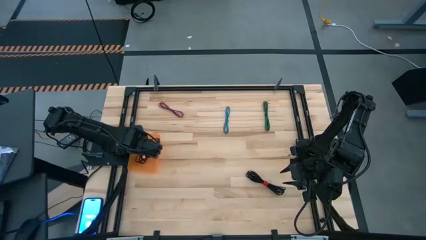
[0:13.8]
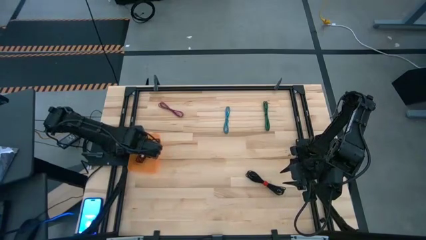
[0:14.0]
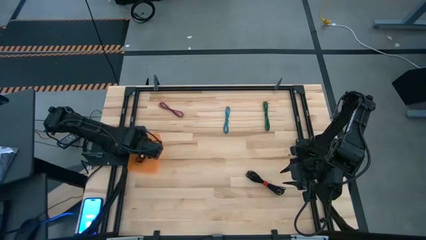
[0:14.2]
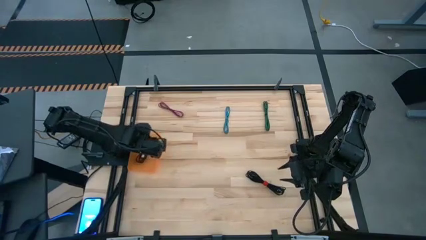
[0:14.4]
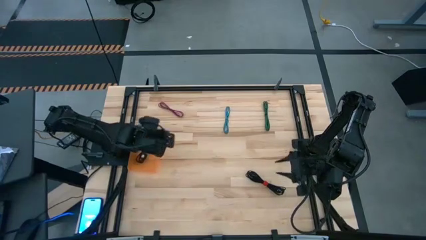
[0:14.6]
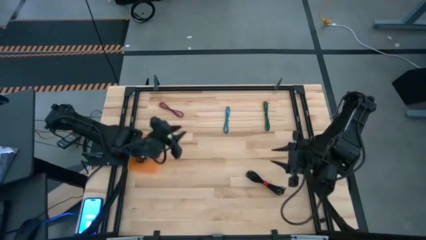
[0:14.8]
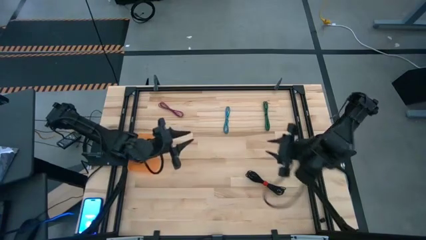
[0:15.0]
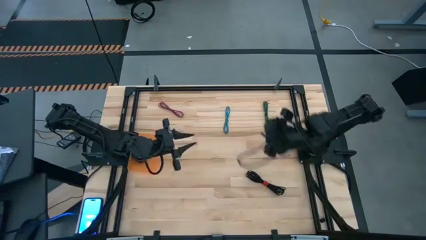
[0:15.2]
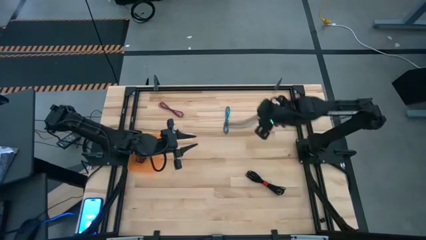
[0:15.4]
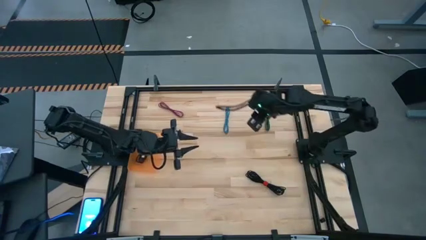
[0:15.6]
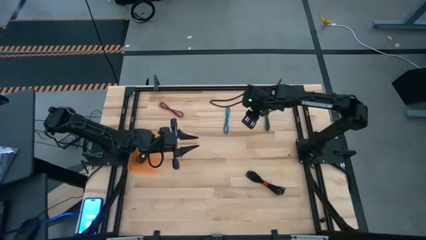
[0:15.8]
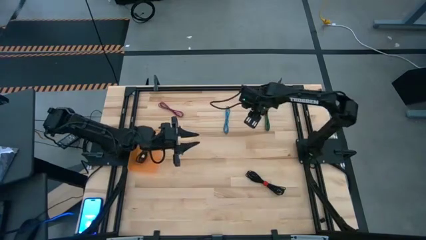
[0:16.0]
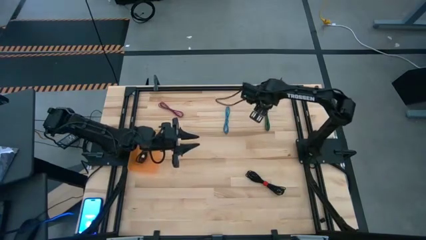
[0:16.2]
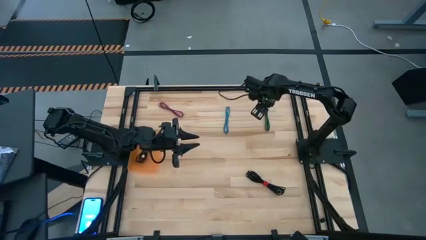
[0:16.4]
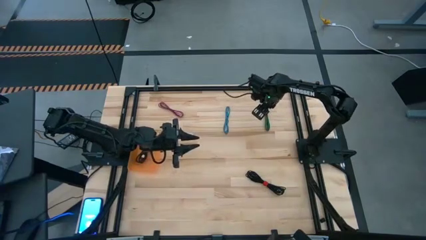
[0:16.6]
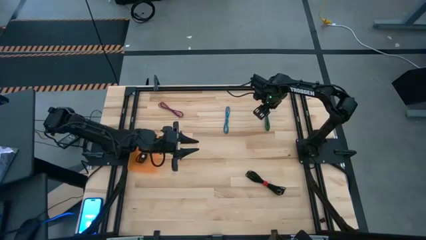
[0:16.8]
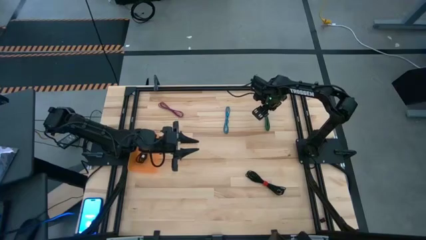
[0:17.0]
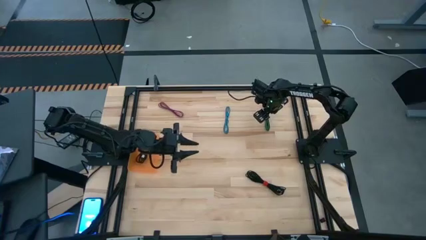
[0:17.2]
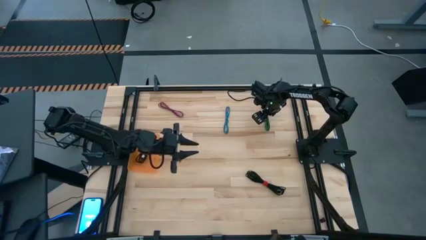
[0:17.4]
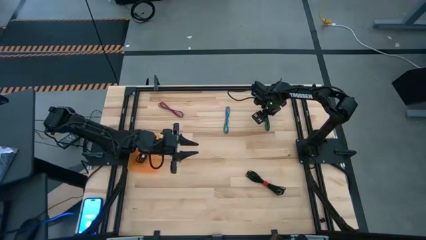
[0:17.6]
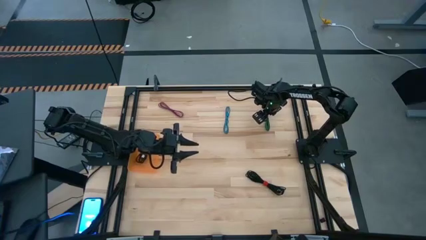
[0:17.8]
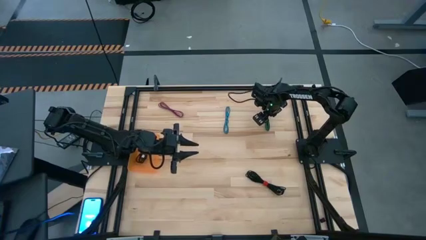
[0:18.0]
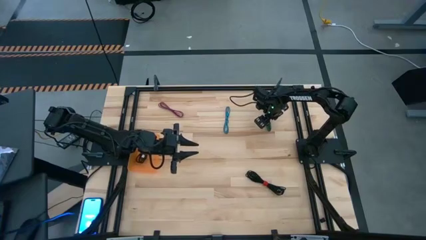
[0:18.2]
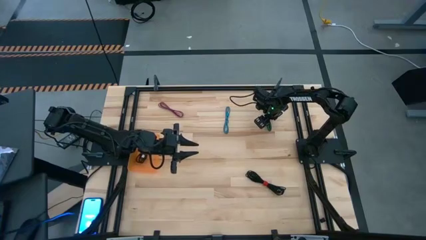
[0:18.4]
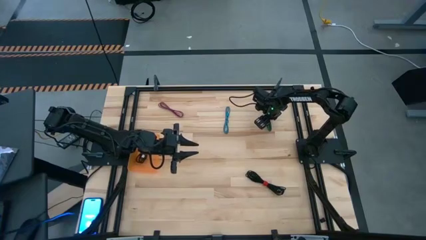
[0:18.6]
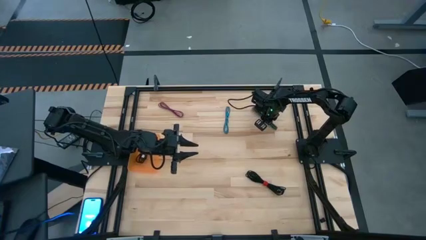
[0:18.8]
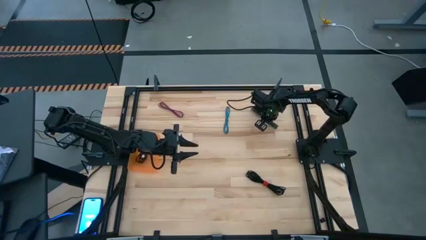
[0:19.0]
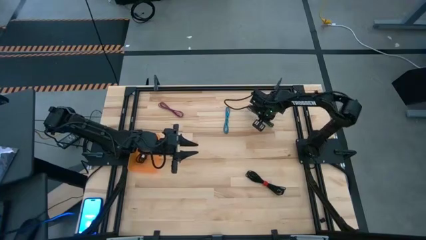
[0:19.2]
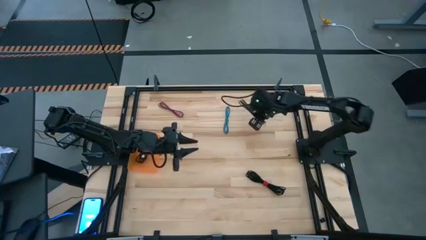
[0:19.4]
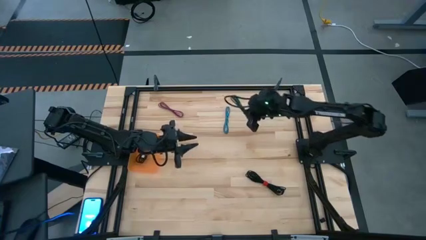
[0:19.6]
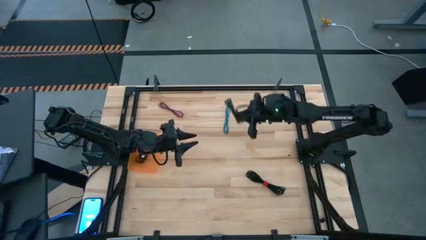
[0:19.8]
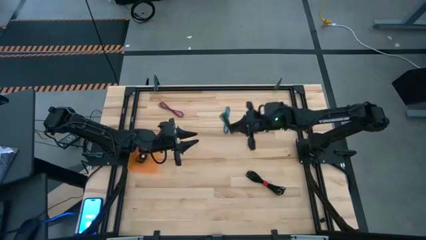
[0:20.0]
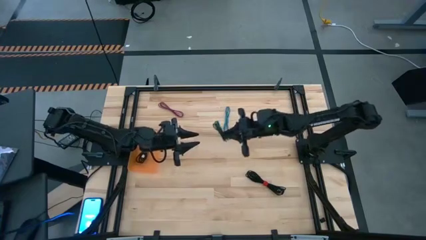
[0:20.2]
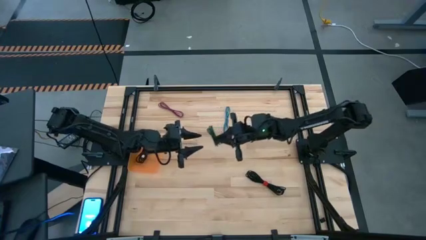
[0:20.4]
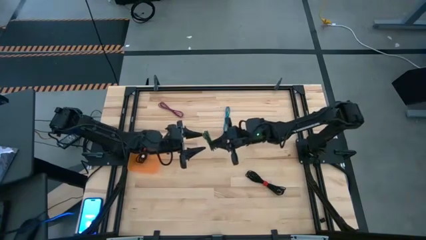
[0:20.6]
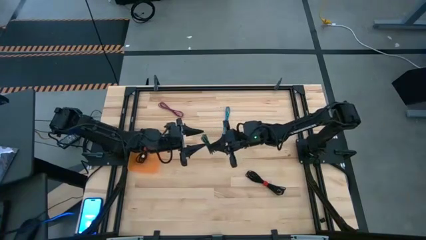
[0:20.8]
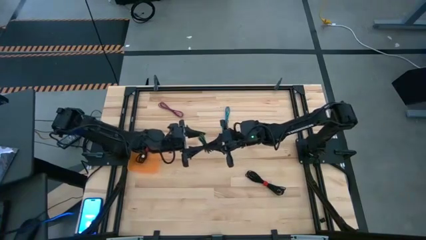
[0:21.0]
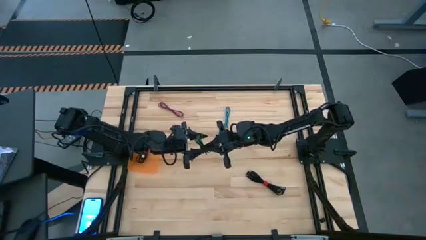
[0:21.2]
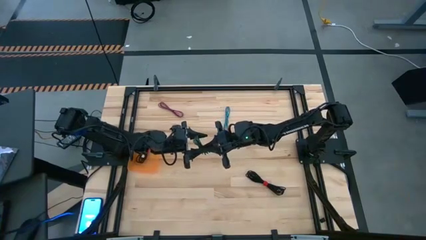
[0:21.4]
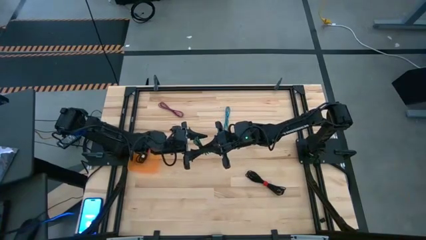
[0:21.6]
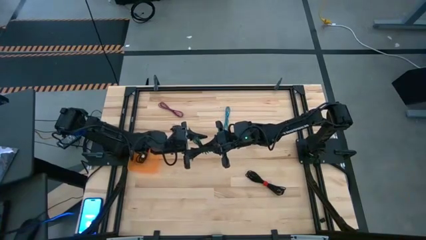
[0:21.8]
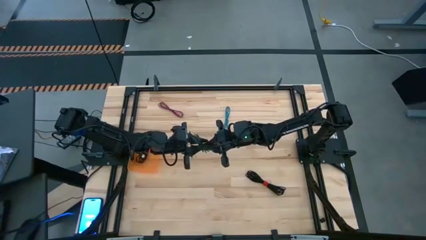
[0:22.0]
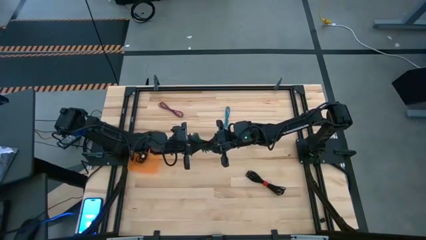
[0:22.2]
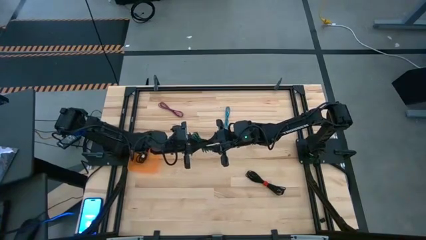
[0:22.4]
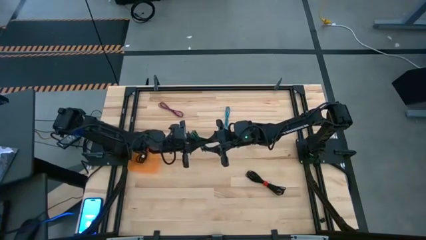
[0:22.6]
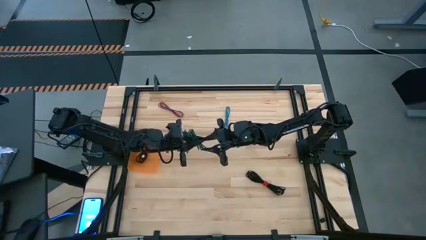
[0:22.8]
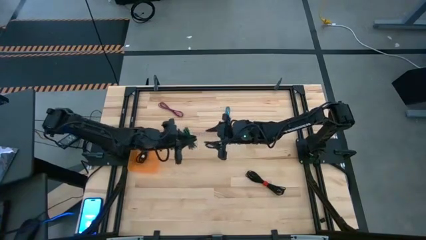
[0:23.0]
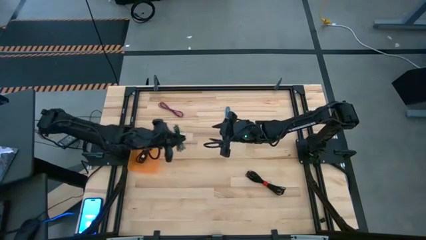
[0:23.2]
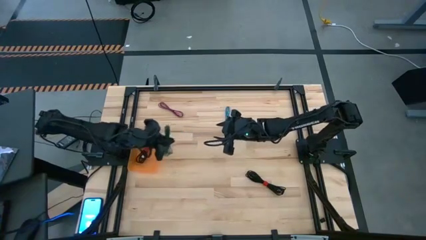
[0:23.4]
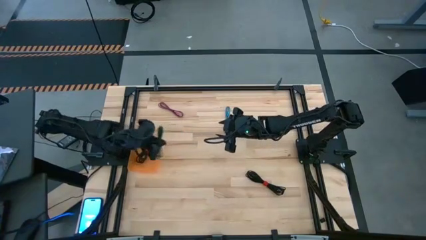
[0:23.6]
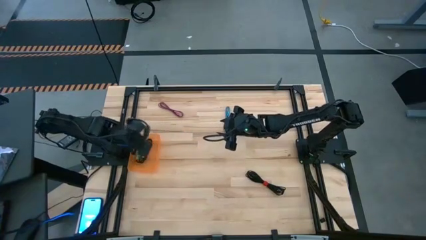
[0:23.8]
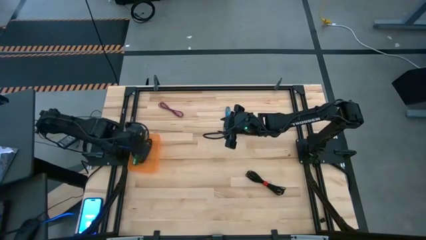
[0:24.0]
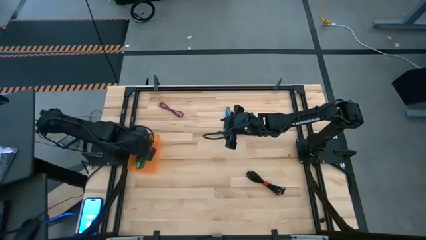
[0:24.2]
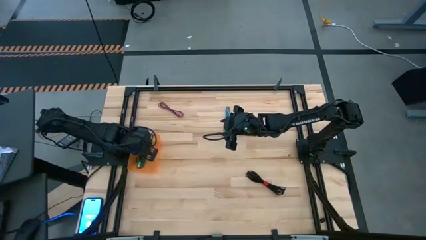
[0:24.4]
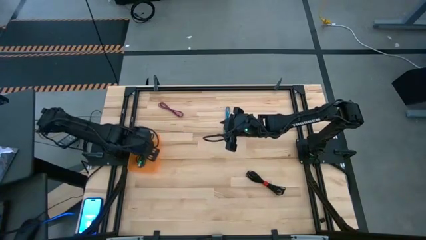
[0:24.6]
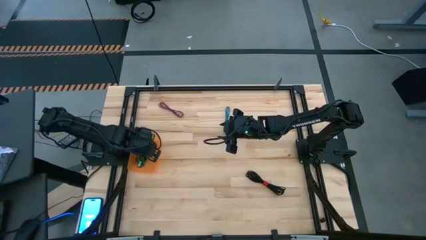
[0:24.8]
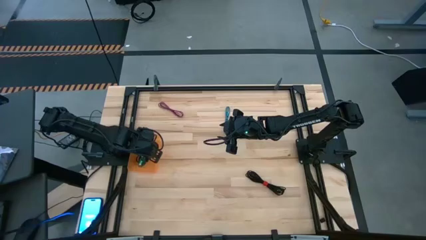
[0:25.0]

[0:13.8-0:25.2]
Task: Pick and place USB-C Cables
Put the green USB cable into the orange bin

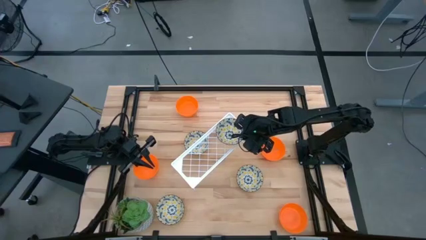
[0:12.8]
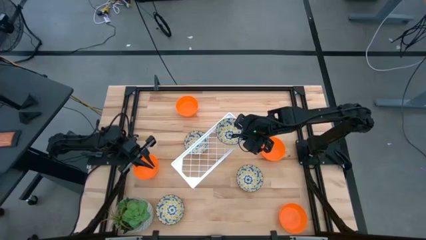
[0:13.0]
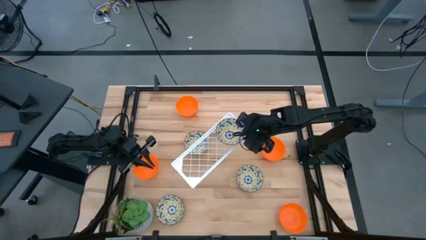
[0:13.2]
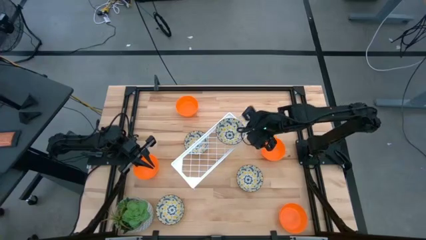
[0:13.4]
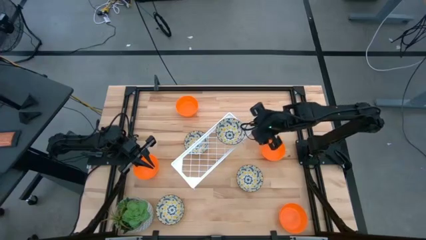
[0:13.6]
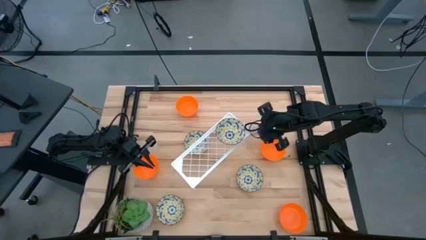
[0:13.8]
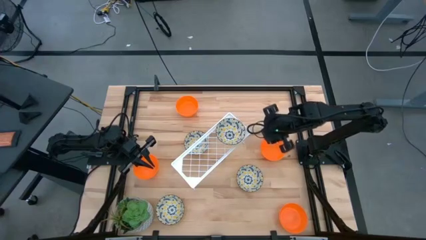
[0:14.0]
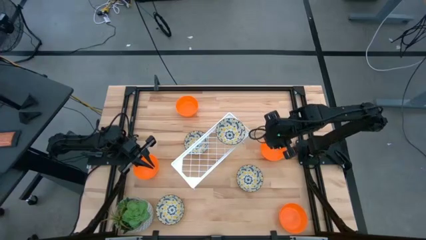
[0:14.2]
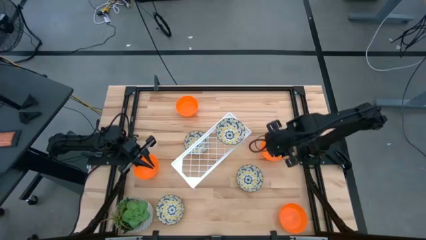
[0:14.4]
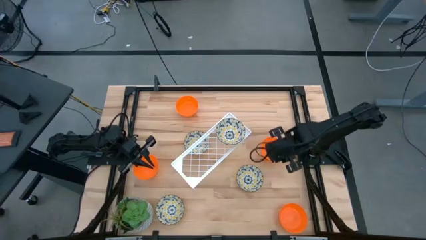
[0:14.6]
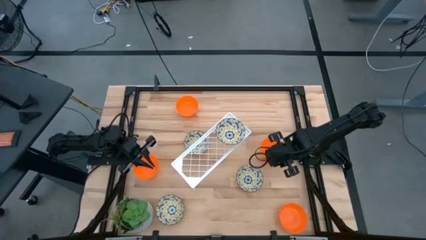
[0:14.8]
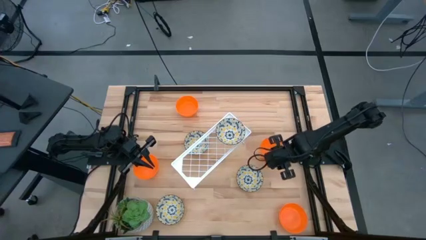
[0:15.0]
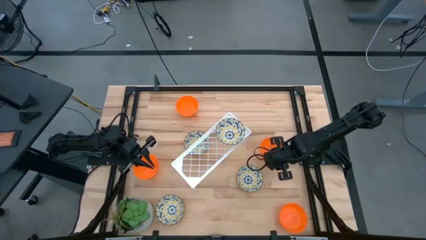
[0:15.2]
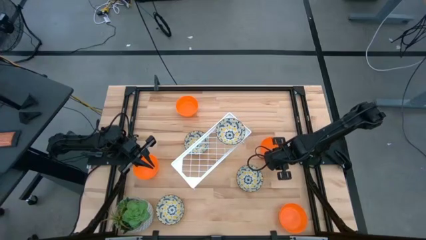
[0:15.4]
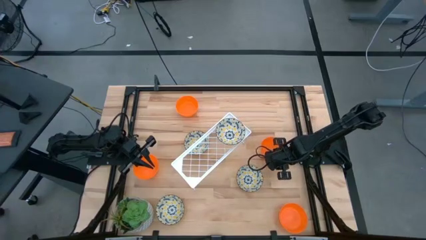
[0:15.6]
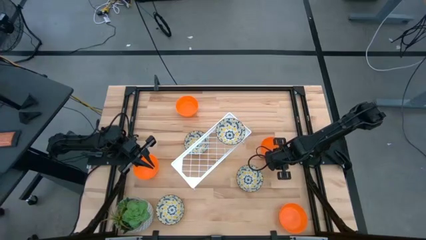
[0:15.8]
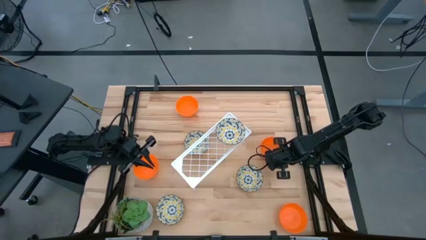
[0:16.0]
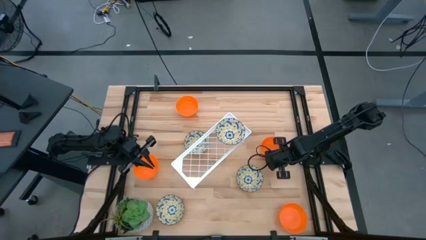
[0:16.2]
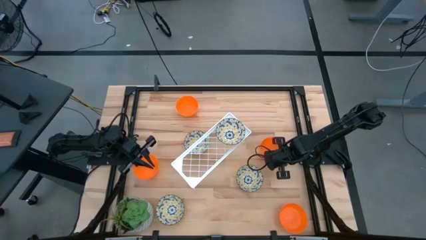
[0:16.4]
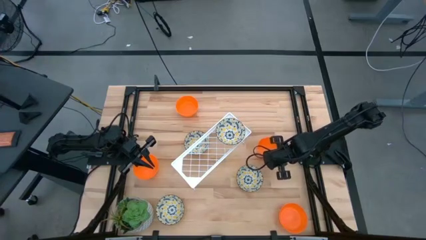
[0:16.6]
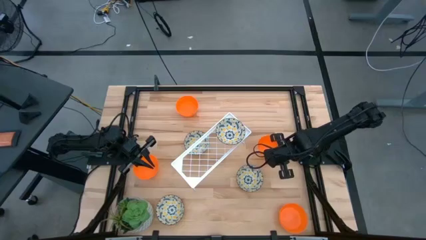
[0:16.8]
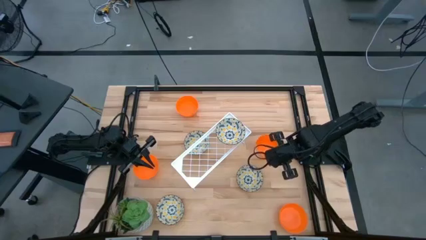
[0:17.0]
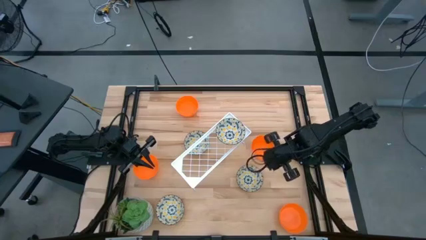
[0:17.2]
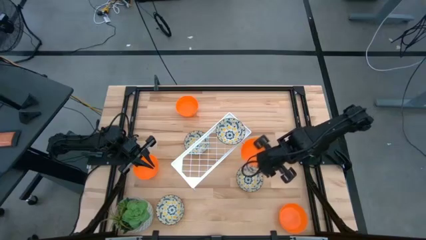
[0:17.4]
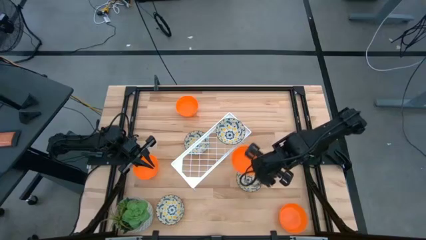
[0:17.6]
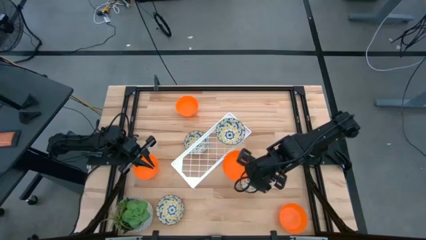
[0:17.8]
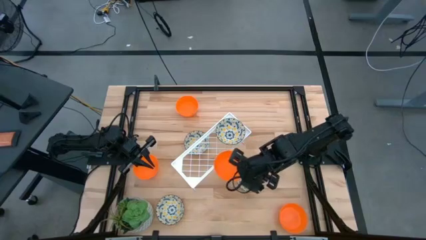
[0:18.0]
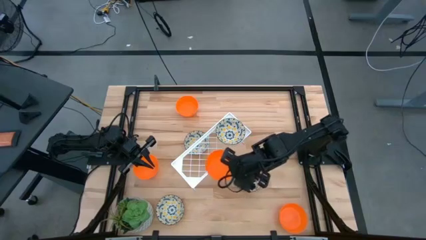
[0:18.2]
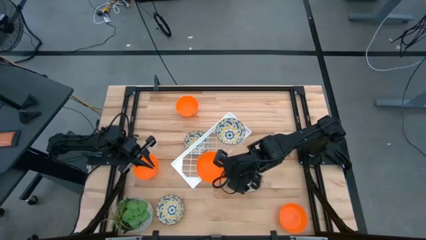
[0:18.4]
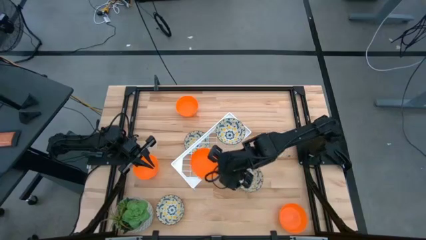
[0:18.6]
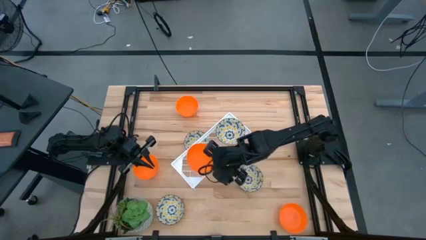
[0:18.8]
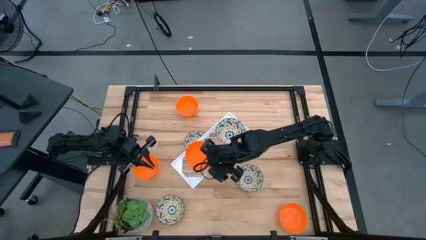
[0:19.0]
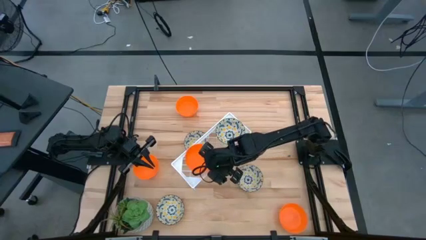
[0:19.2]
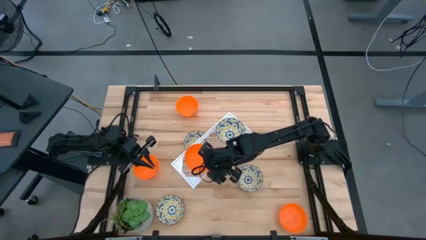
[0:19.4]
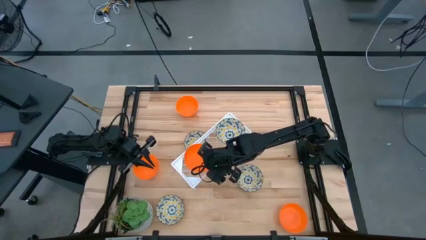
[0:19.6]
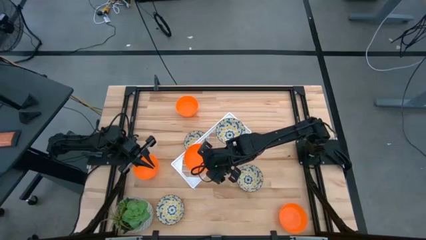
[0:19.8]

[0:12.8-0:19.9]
Task: Pick & Place Mini bowls
Put the orange bowl on the shelf
